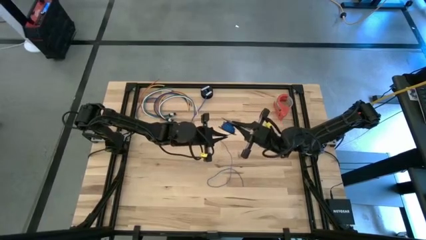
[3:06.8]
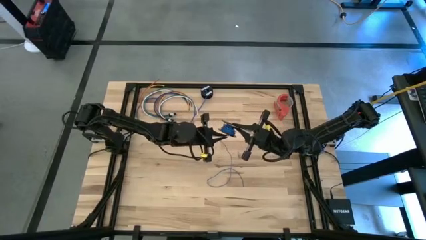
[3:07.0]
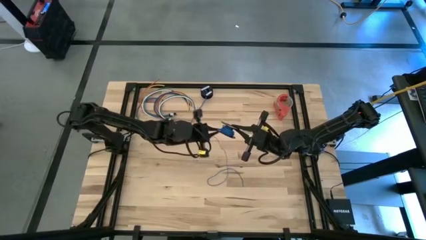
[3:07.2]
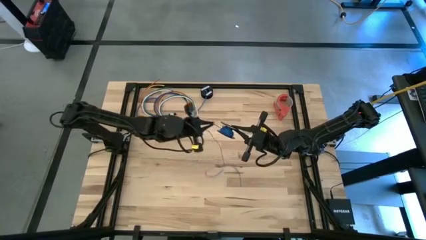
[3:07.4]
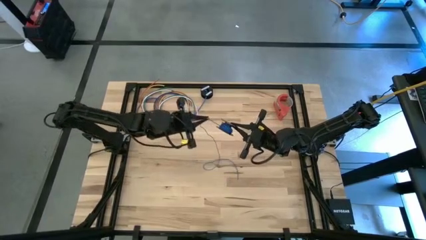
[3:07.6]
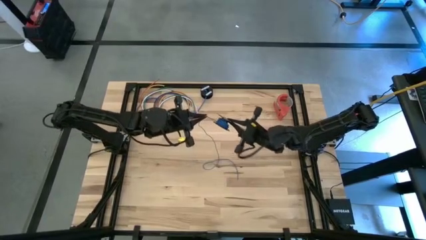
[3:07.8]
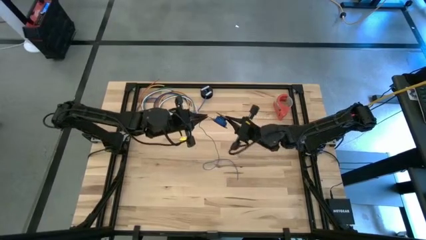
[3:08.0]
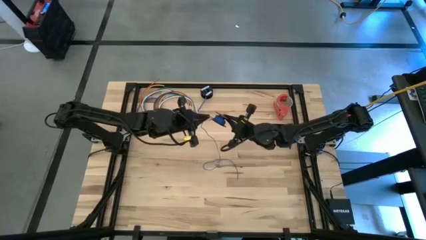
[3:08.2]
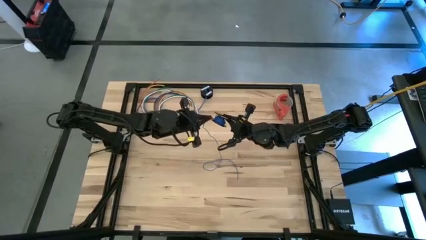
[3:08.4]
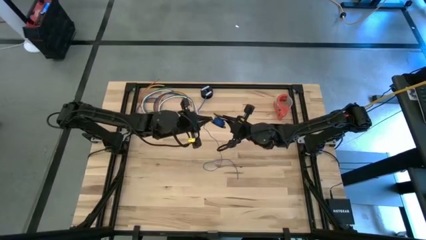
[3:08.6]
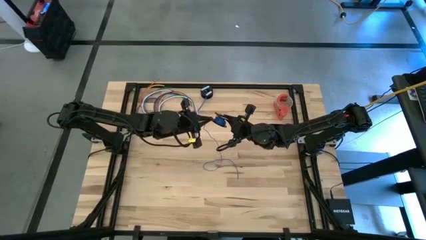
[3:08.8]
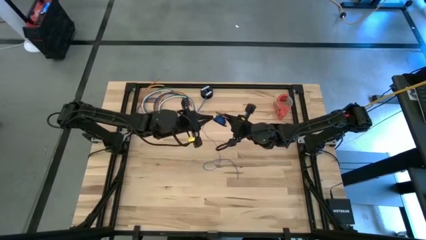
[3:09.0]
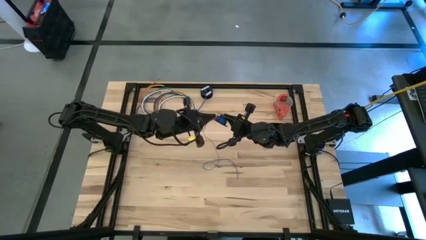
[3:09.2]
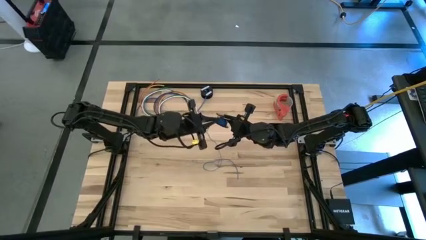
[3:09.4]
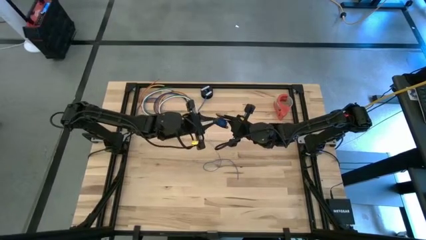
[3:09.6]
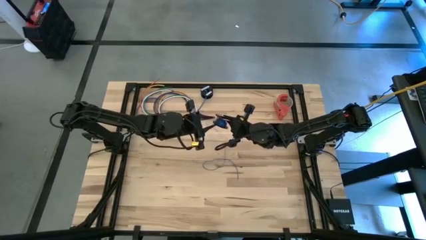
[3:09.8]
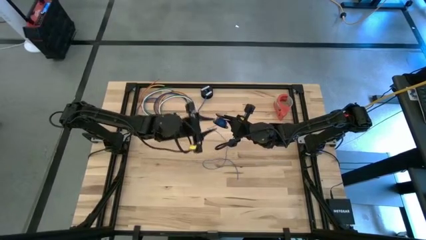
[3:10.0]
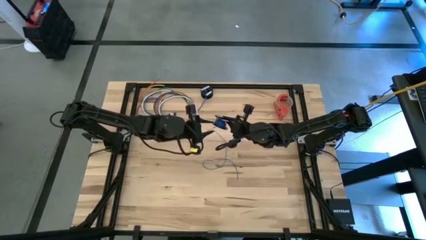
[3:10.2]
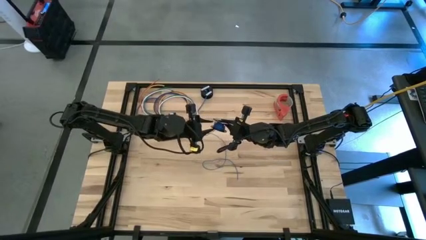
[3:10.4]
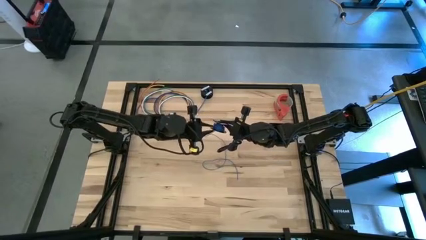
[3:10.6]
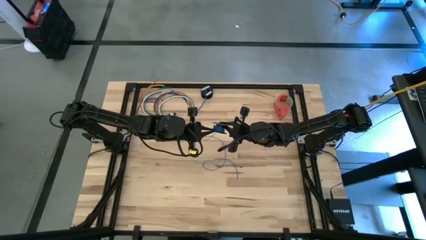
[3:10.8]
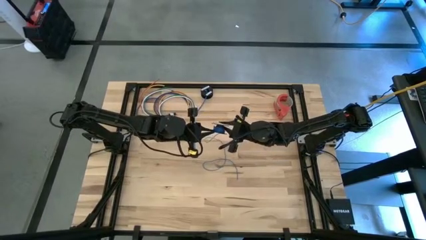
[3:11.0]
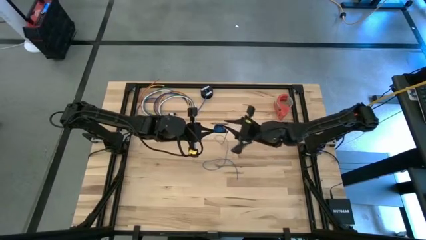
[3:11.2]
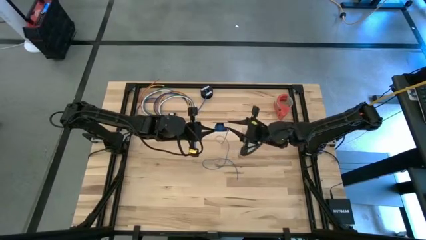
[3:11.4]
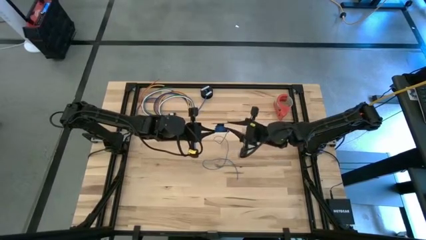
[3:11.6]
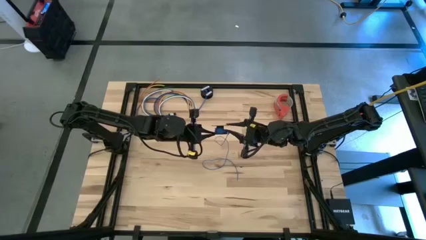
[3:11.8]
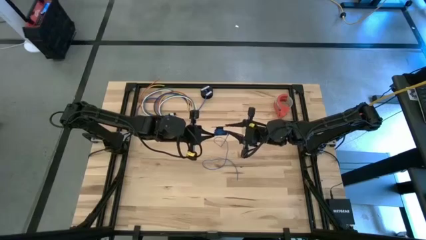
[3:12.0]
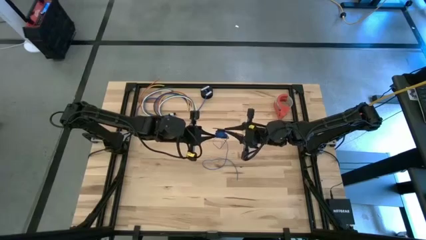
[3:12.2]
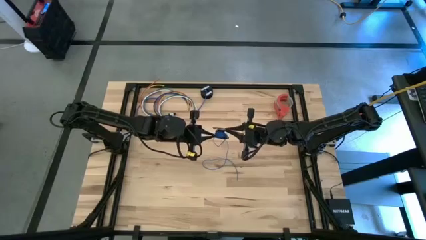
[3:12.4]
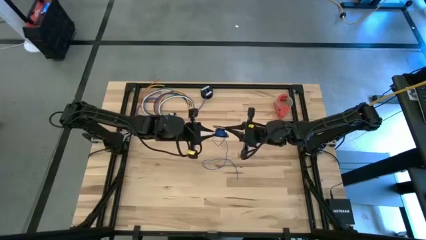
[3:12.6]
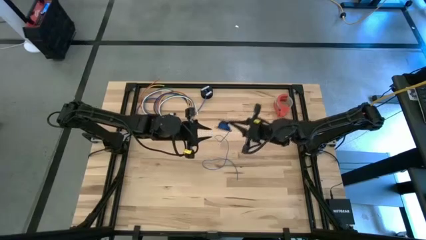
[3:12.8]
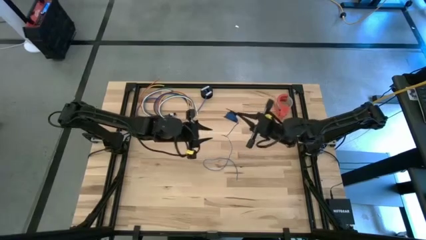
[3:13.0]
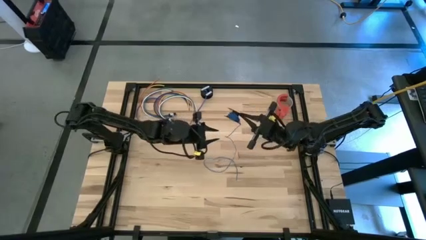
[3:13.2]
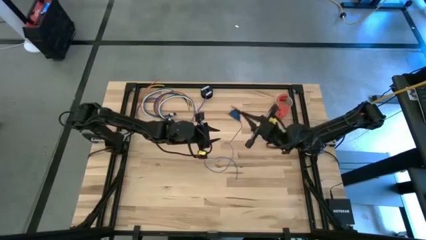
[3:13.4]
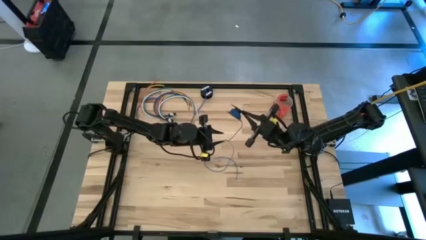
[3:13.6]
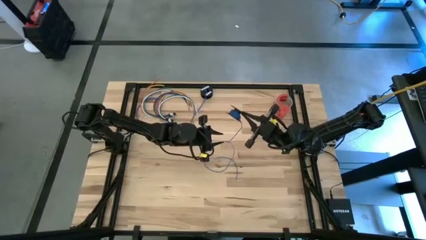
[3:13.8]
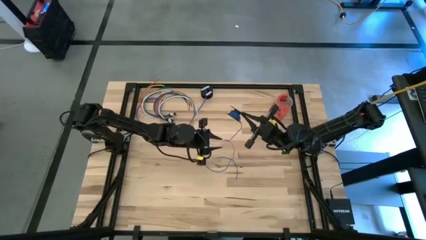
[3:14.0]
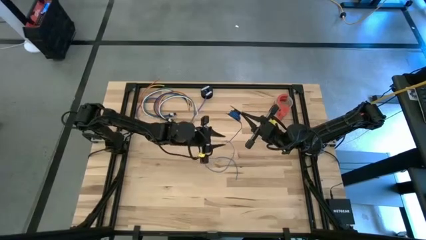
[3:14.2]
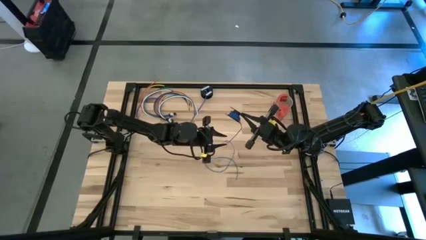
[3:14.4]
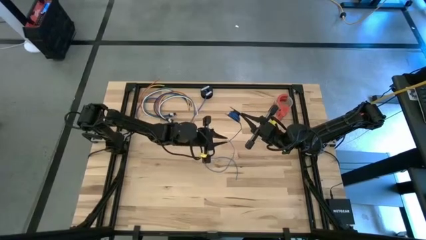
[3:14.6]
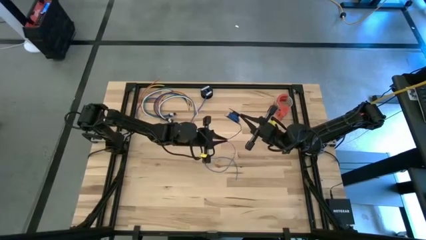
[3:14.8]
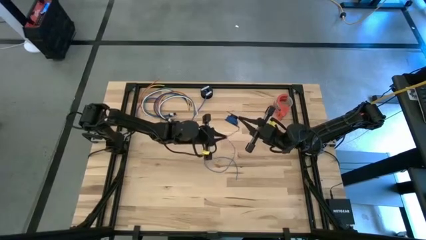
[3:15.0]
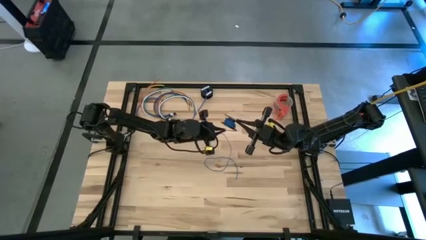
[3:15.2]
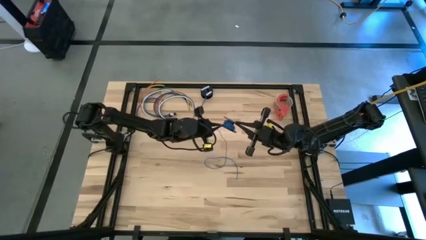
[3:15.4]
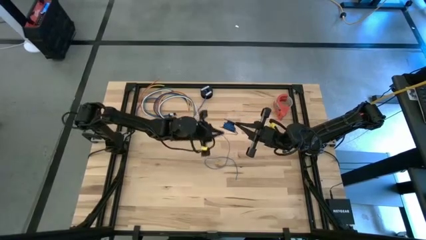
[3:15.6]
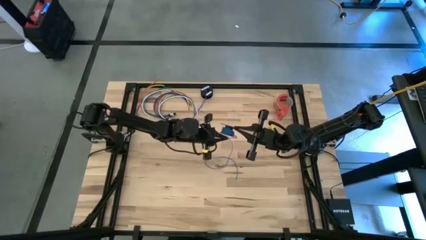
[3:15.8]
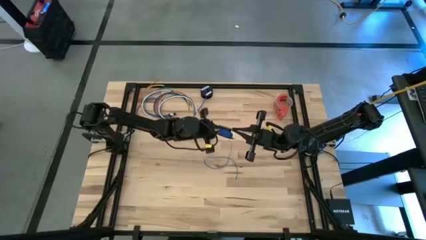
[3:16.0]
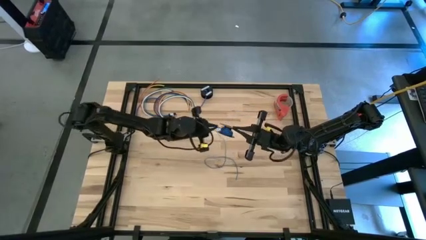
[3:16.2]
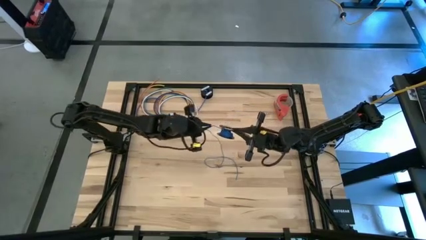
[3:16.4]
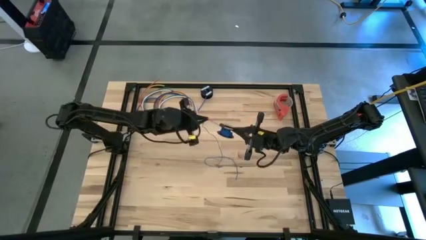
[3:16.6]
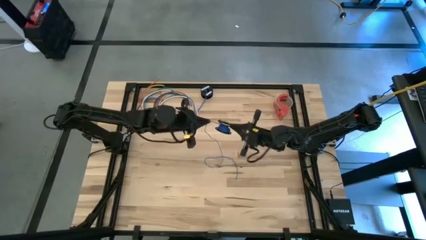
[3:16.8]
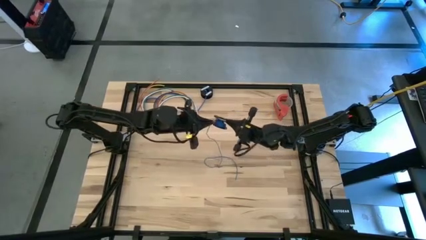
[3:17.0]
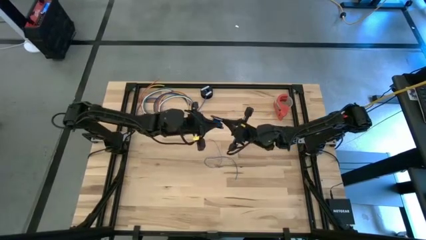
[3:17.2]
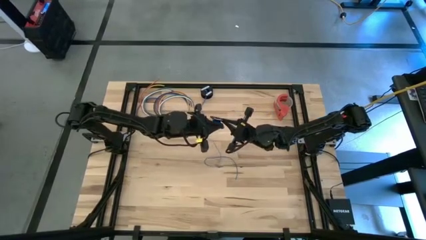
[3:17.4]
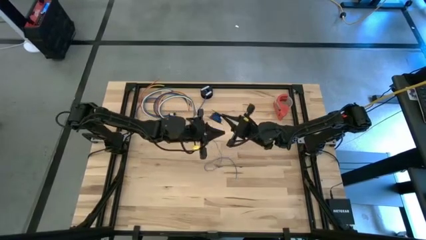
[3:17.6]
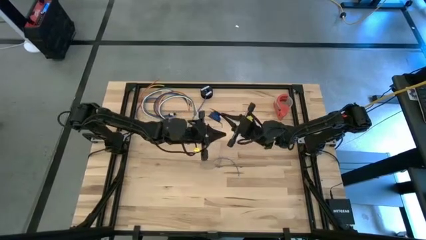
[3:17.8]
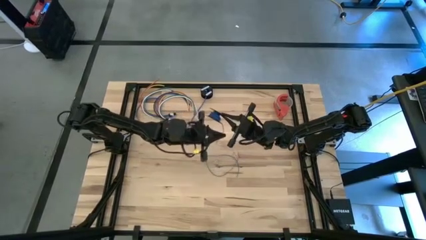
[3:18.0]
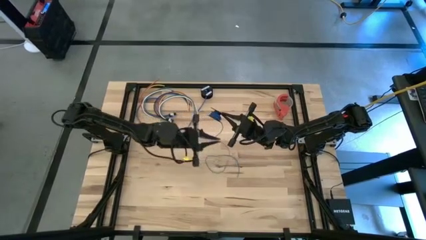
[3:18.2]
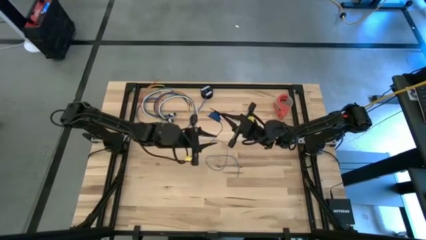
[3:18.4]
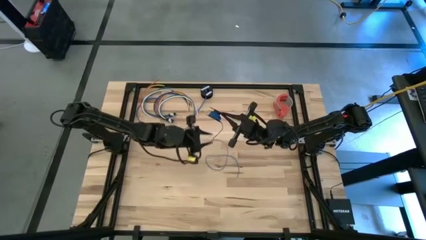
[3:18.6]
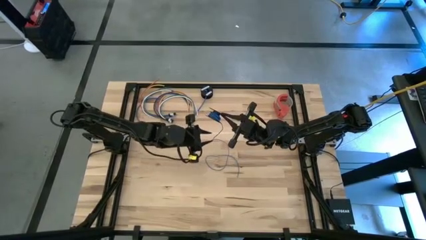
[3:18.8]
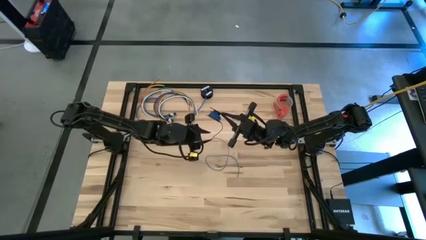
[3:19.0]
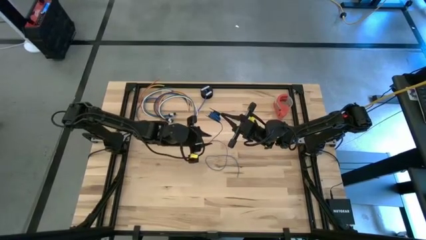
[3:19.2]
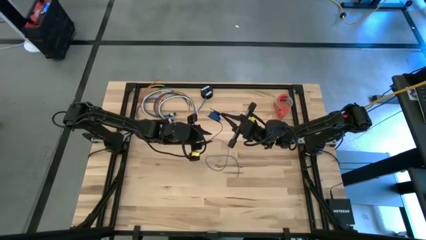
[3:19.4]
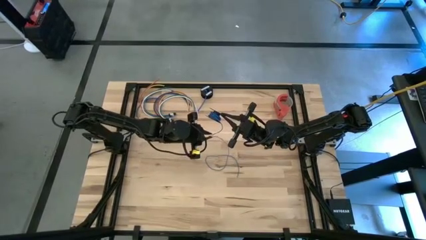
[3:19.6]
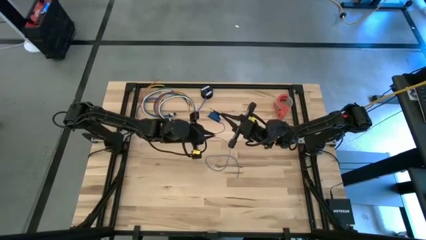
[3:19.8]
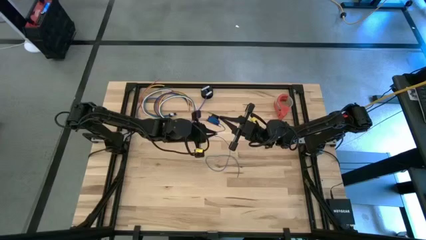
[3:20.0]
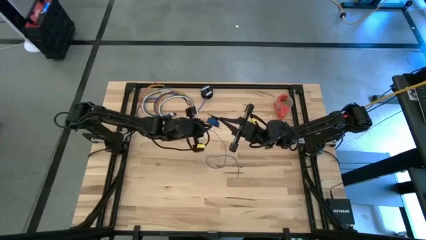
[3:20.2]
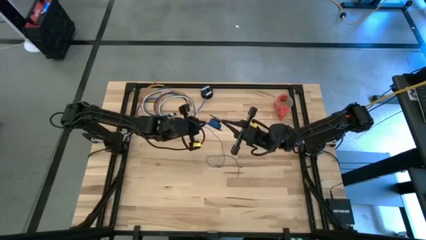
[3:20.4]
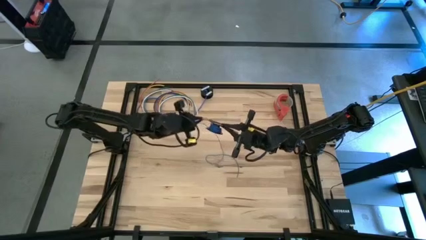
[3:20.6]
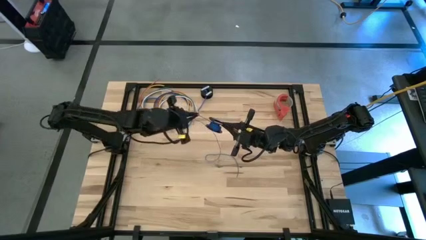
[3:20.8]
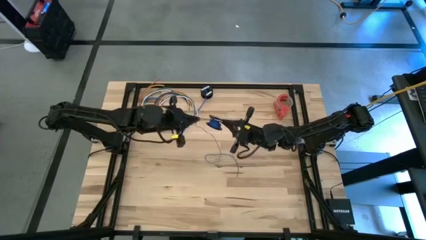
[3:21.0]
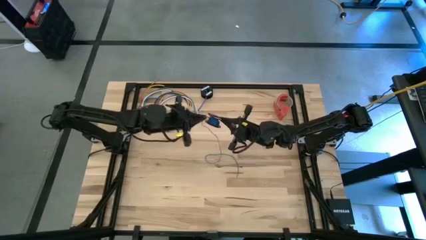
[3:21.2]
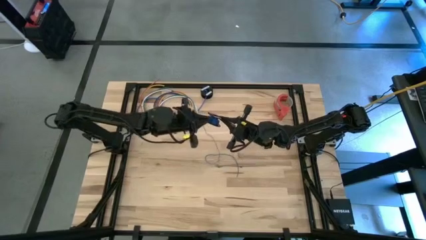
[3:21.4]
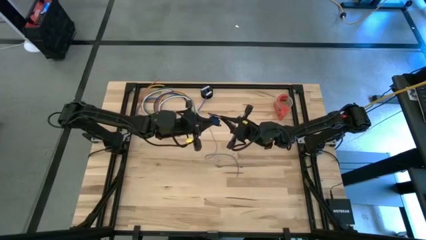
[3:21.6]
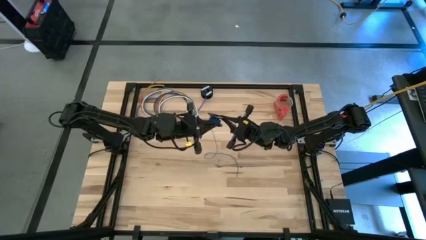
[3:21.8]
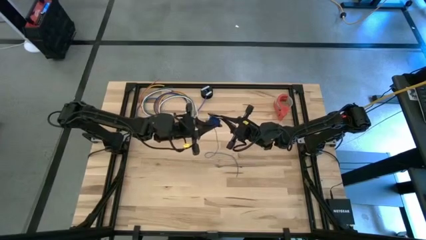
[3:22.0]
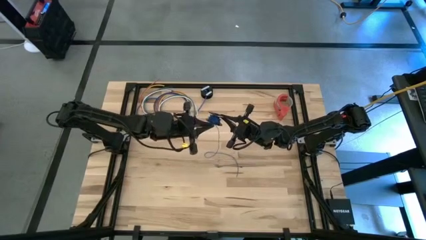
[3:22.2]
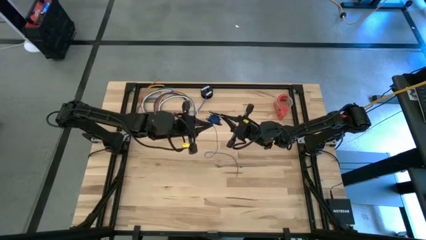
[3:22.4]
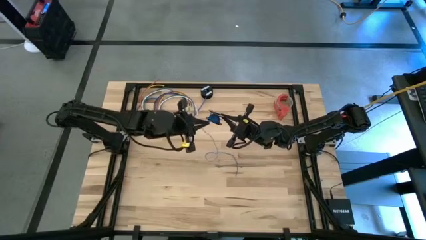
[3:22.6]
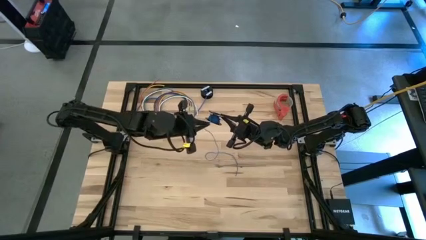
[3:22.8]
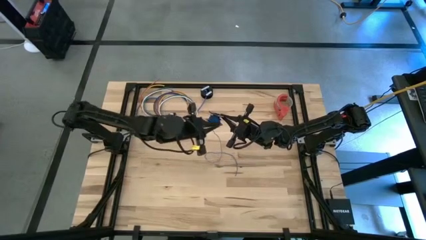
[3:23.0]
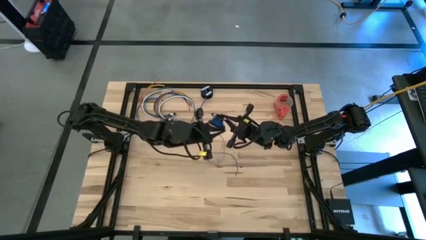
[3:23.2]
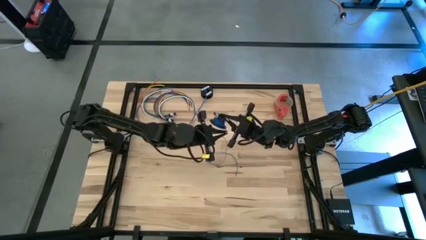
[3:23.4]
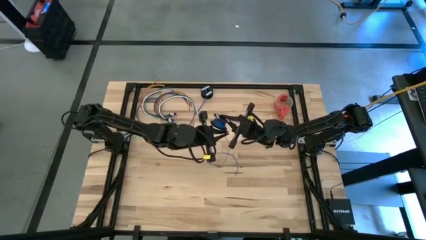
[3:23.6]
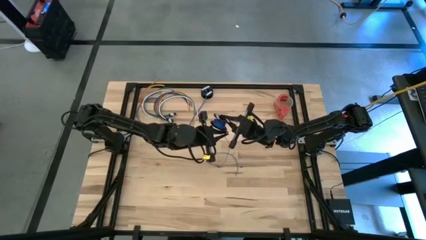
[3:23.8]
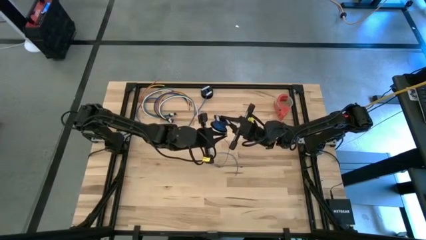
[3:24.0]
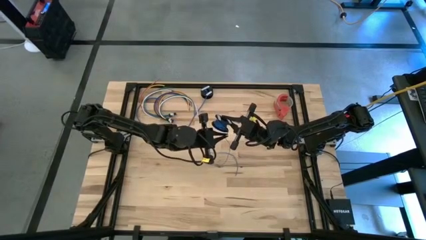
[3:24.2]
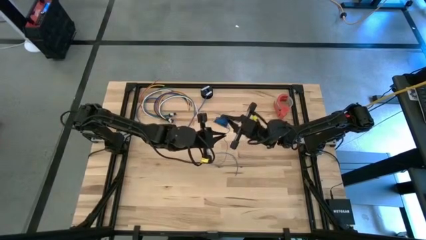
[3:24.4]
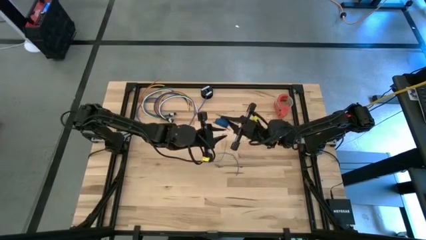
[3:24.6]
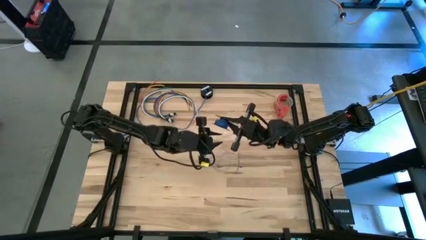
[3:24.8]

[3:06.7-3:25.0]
Task: Coil cords
Coil the blue wire onto the black spool
